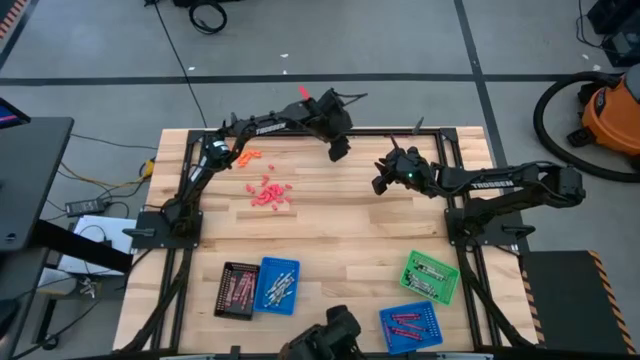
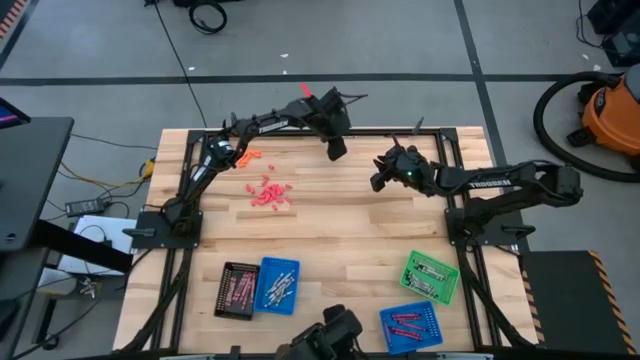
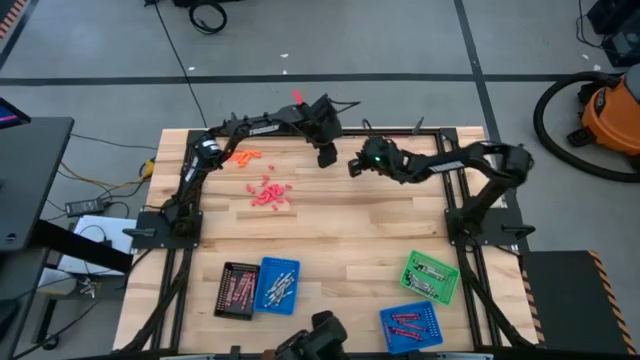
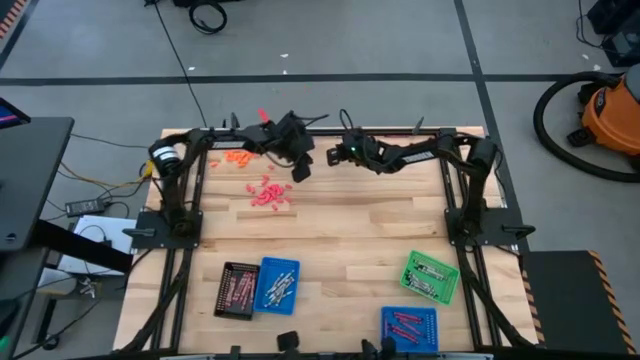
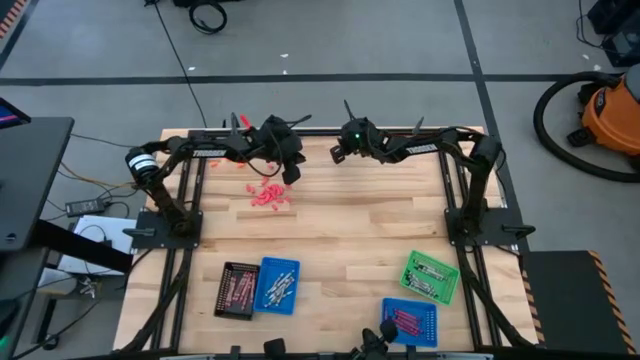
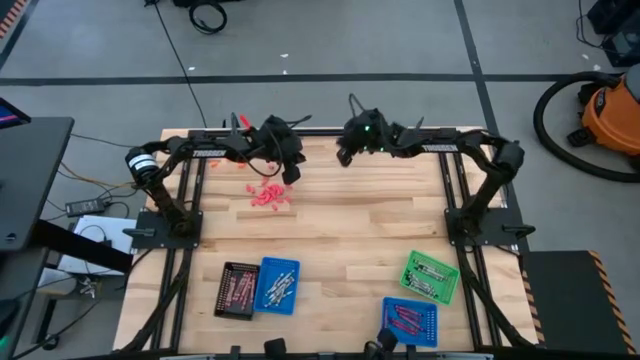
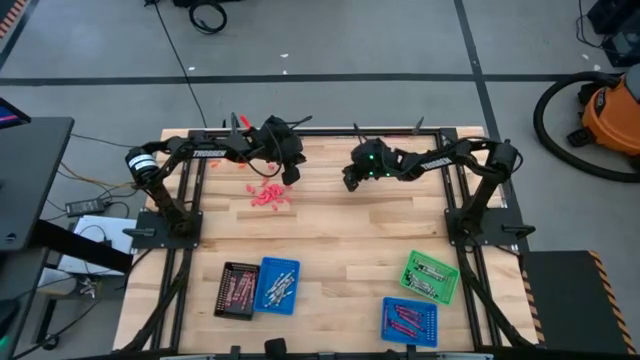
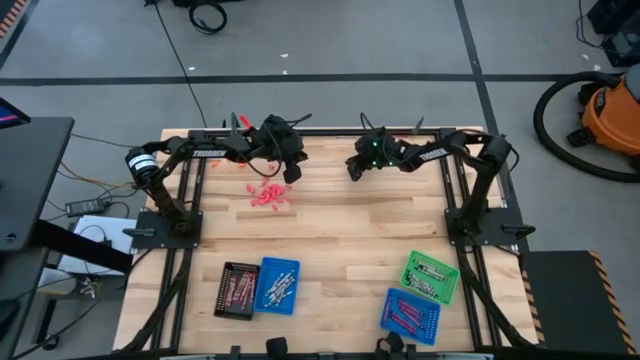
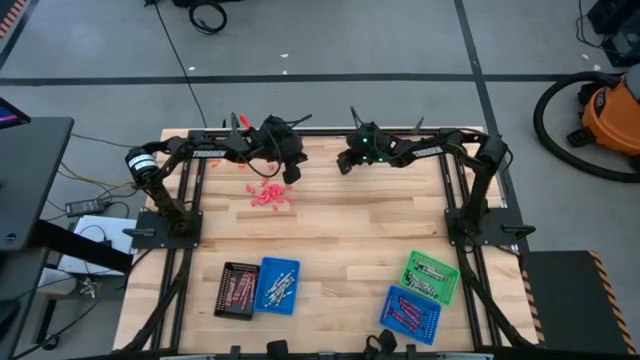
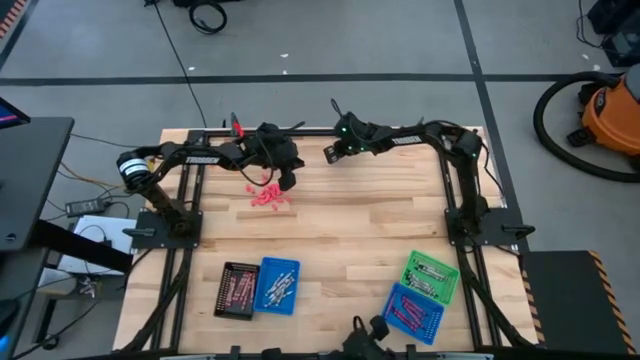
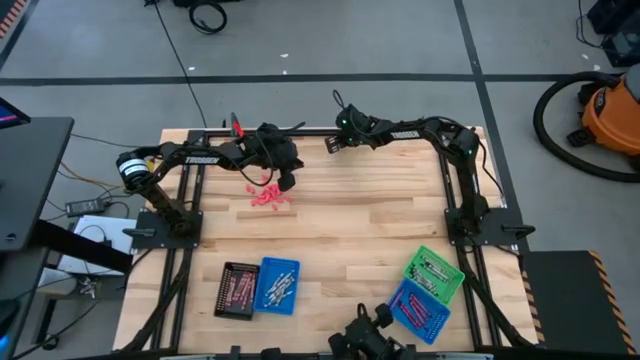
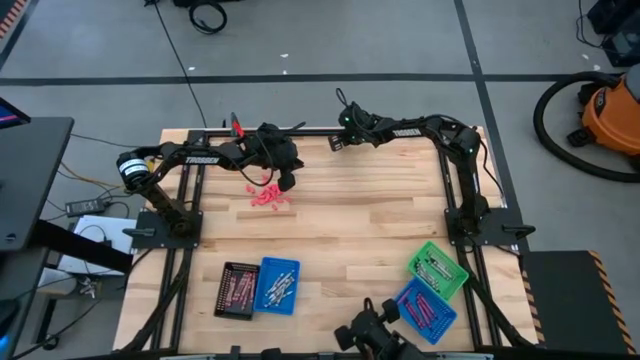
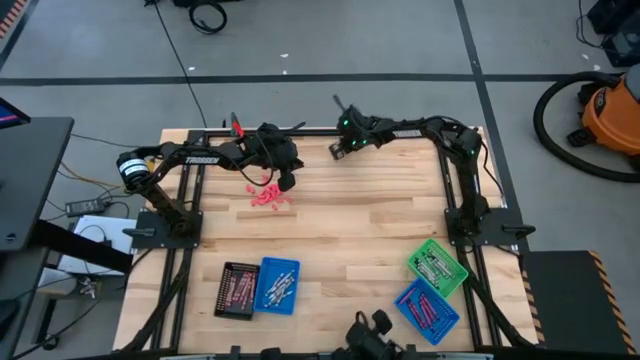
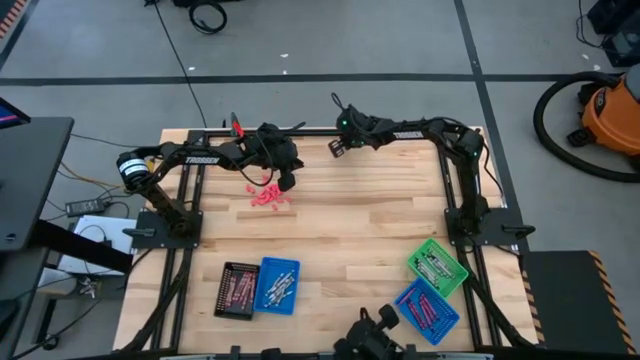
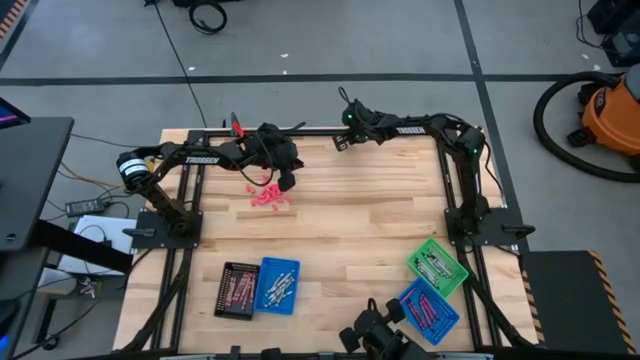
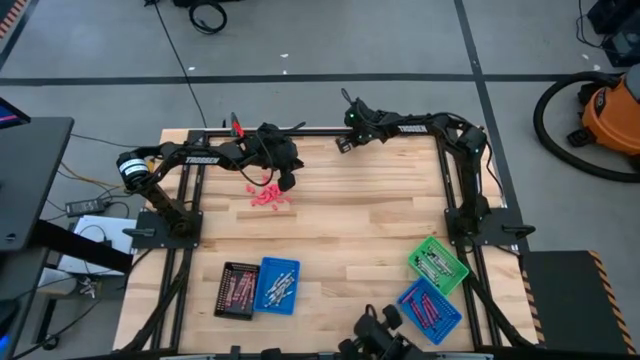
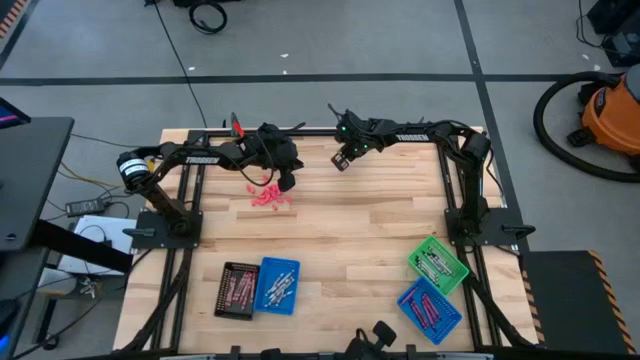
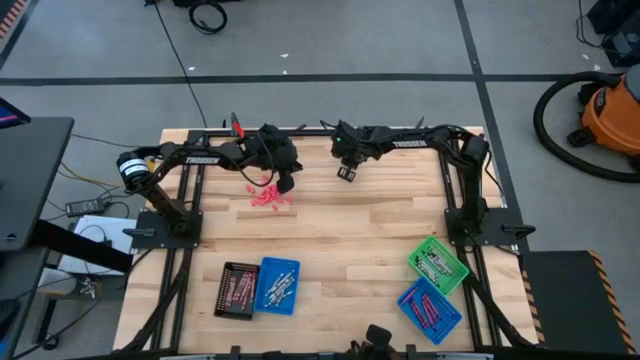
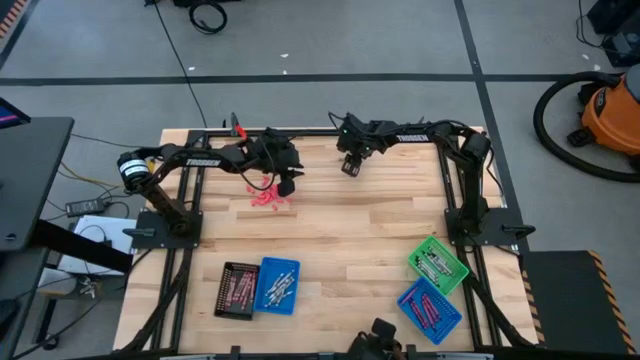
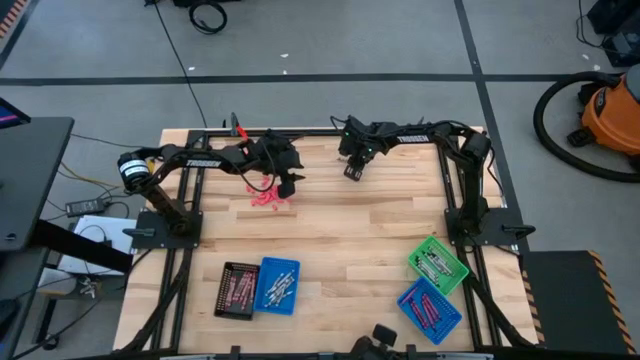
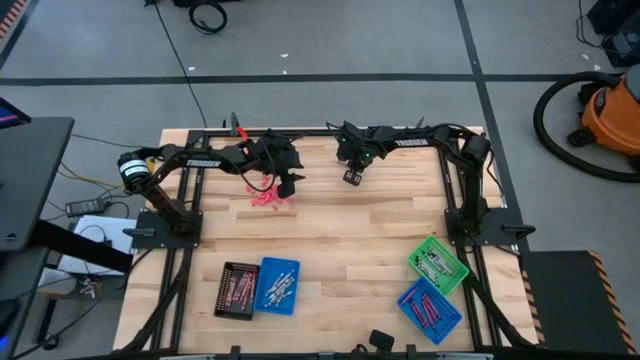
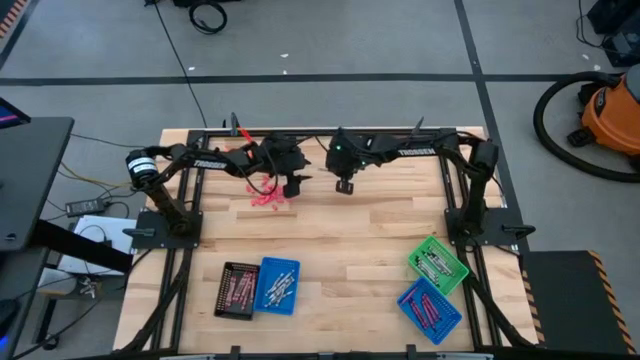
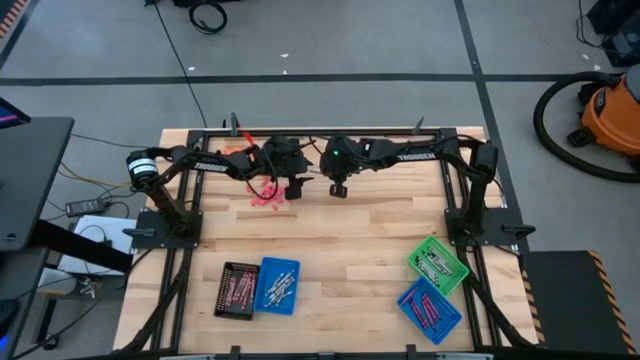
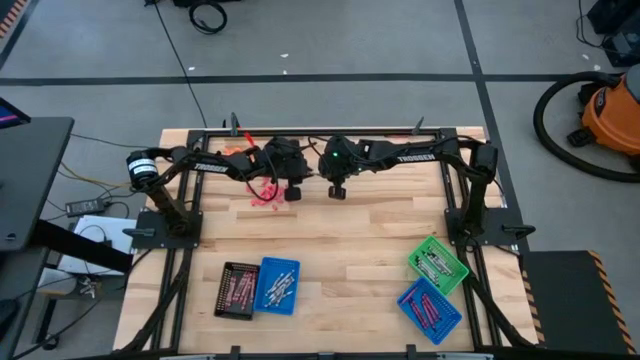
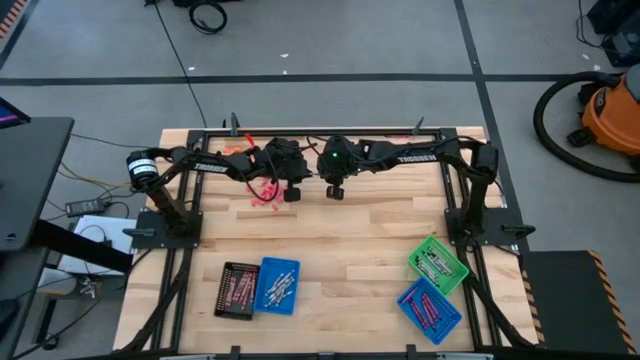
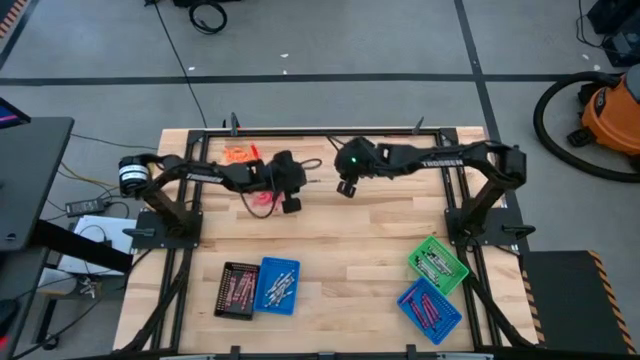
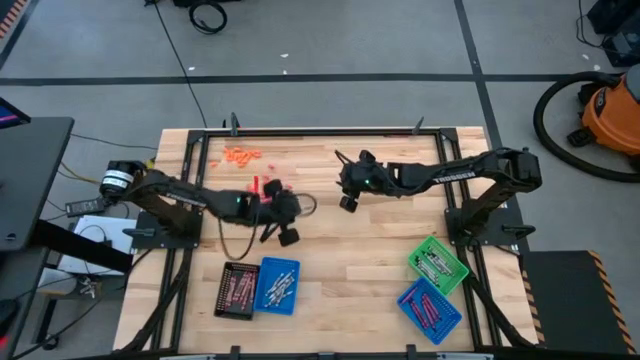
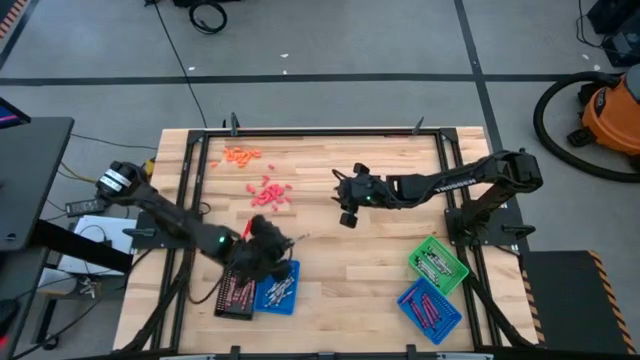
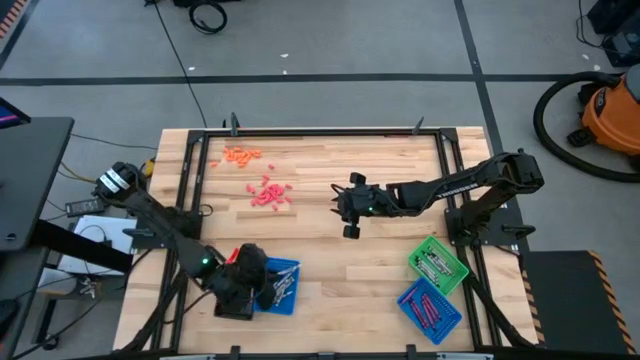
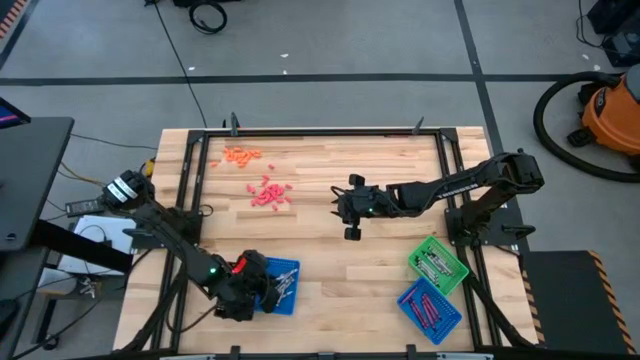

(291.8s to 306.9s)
Task: Sort crayons
Put the white crayon into the left blue bin

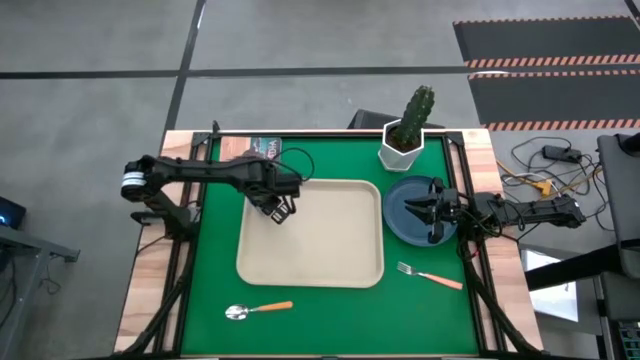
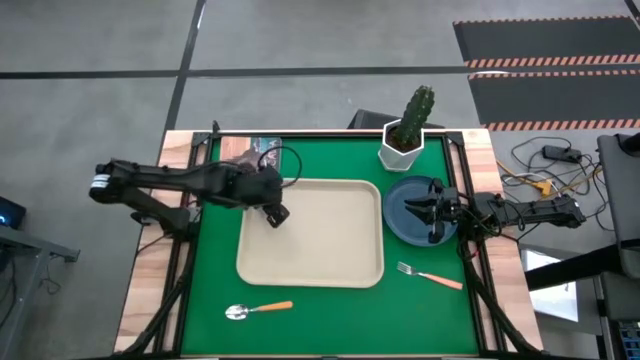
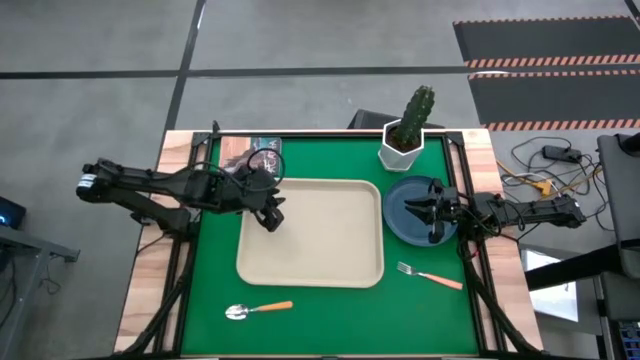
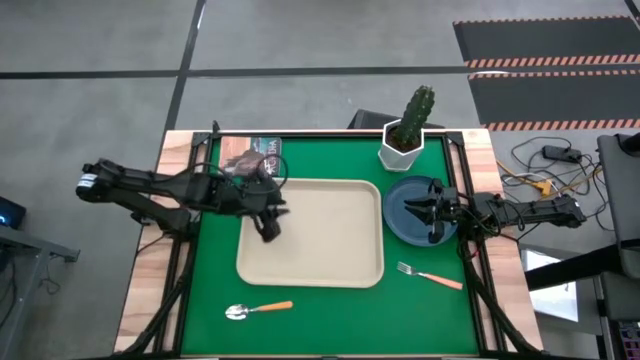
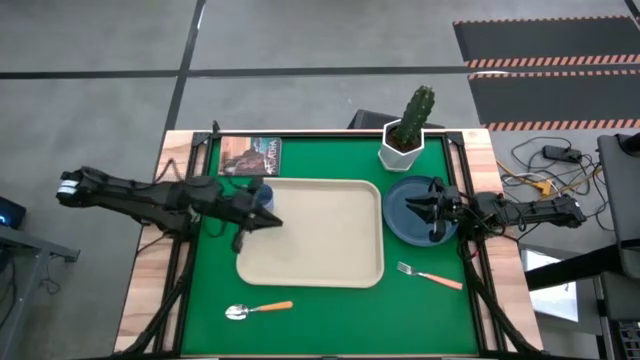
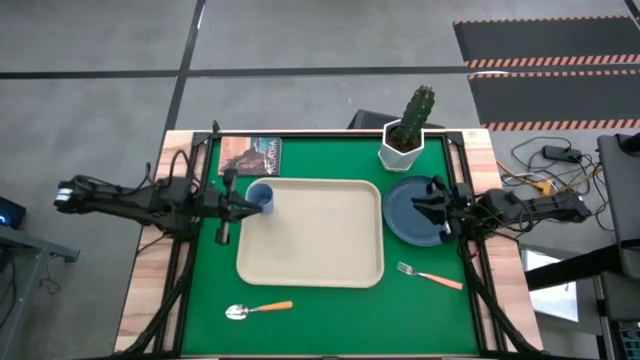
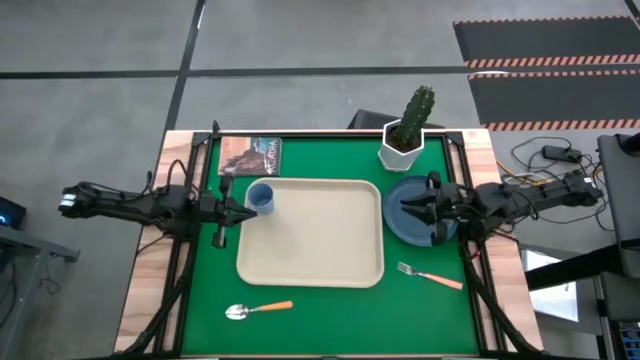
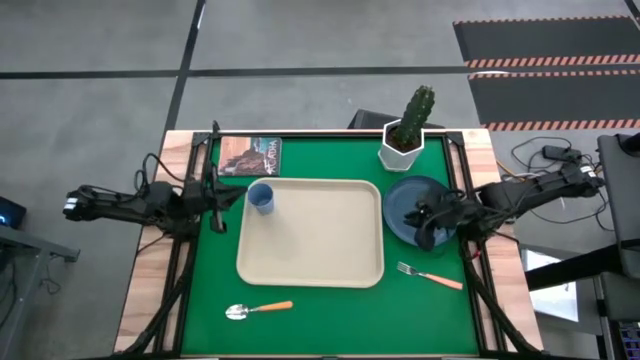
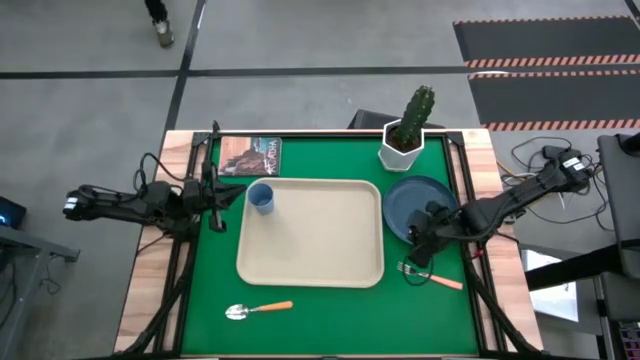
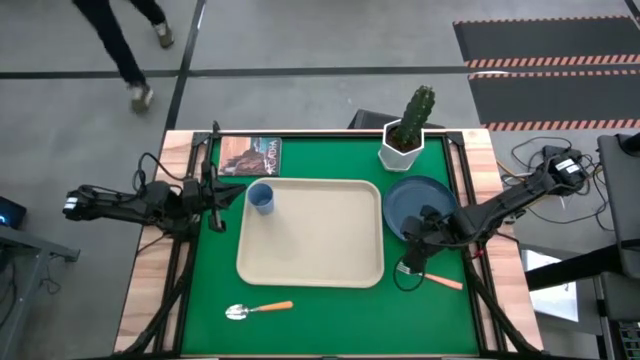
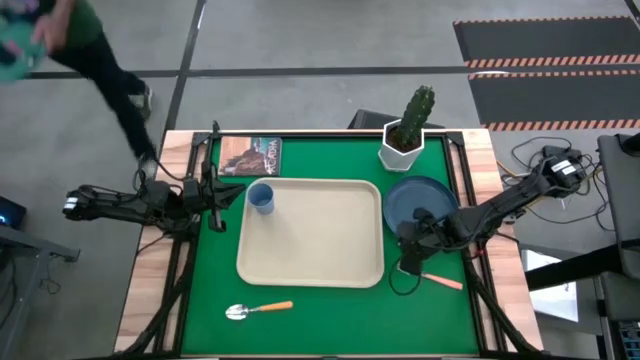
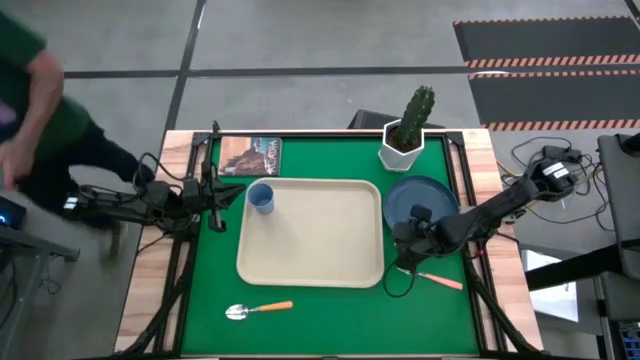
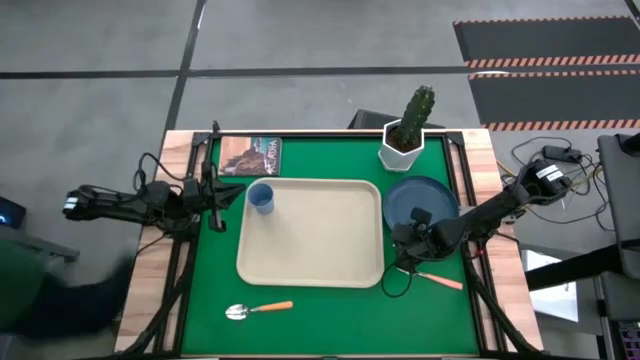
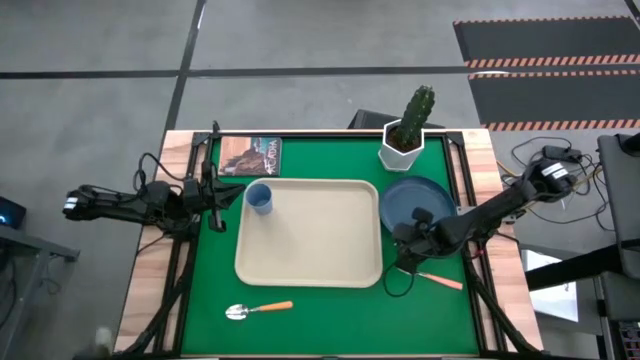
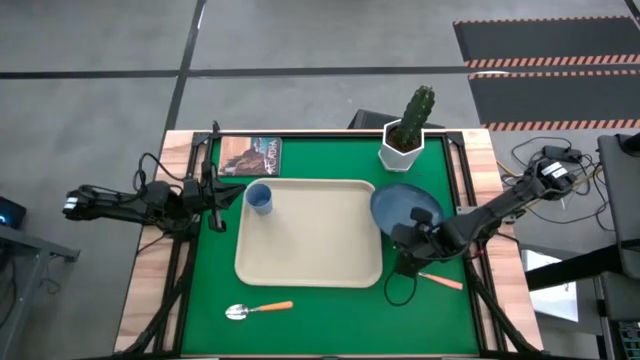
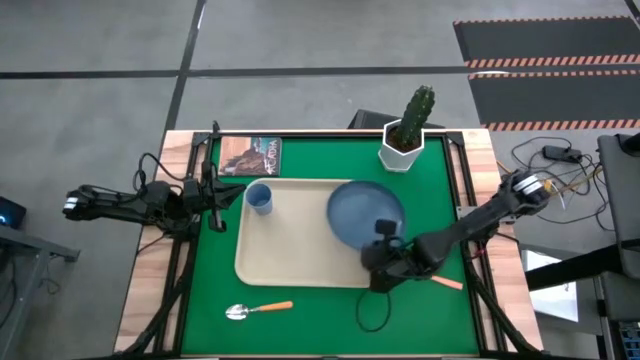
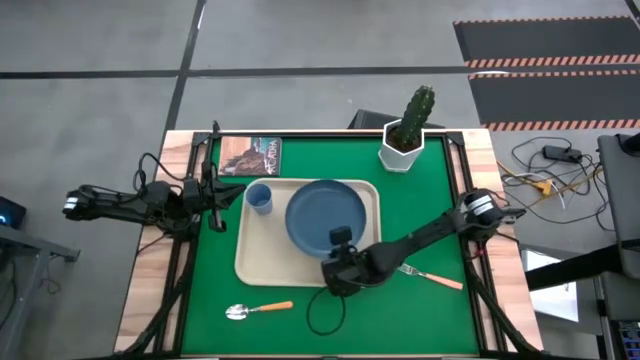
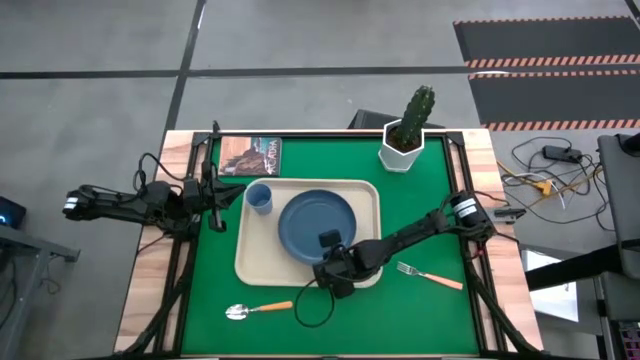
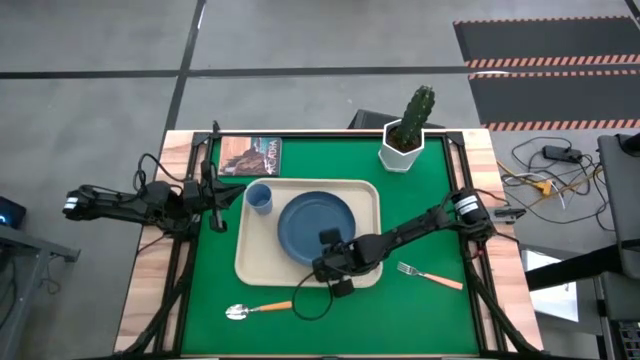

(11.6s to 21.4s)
Task: Pick and place plate/cup/fork/spoon on tray
Put the blue plate on the white serving tray on the bottom left of the blue cup
